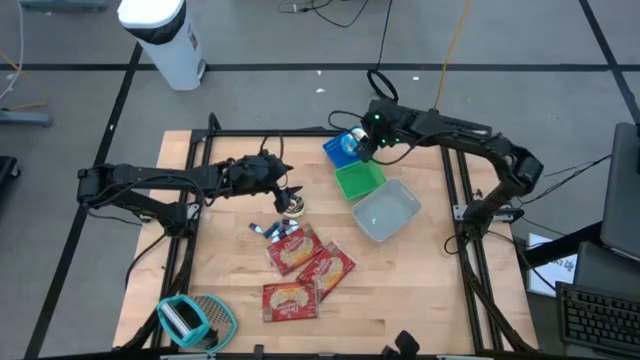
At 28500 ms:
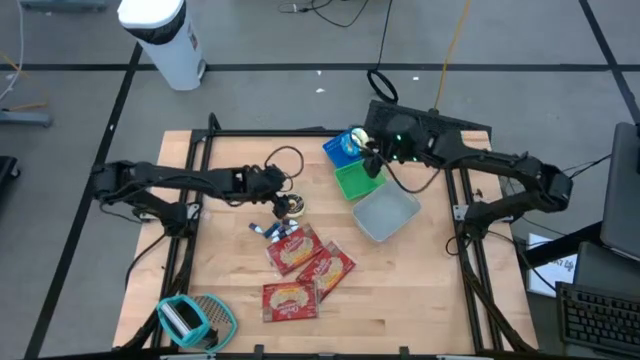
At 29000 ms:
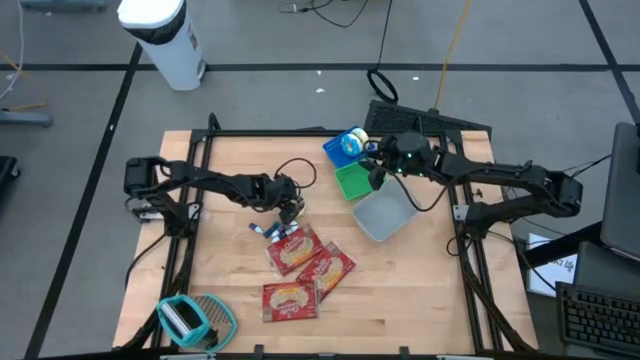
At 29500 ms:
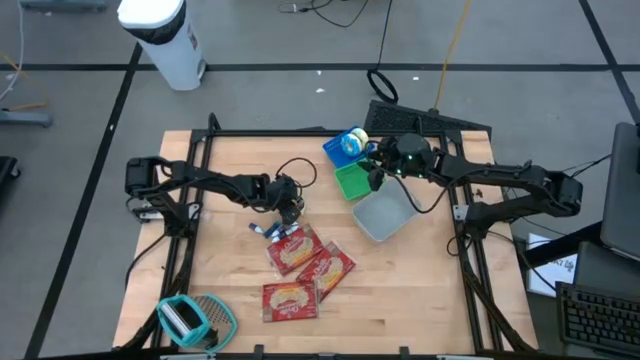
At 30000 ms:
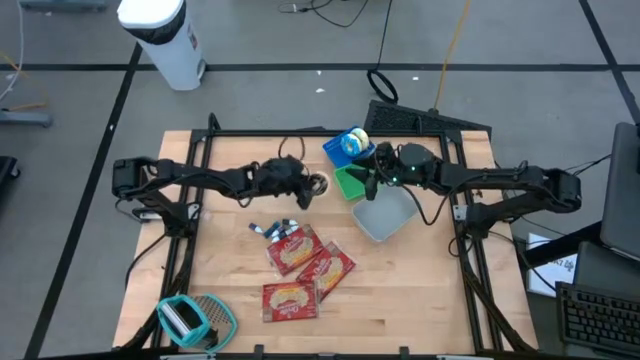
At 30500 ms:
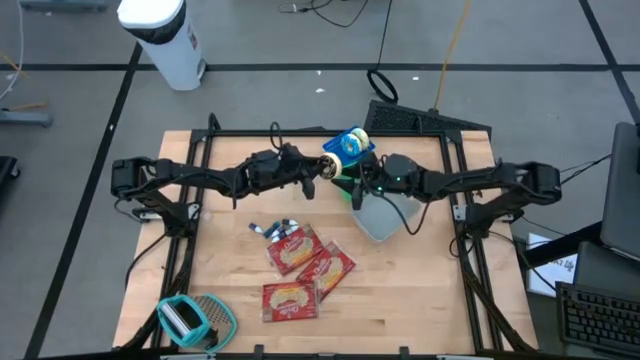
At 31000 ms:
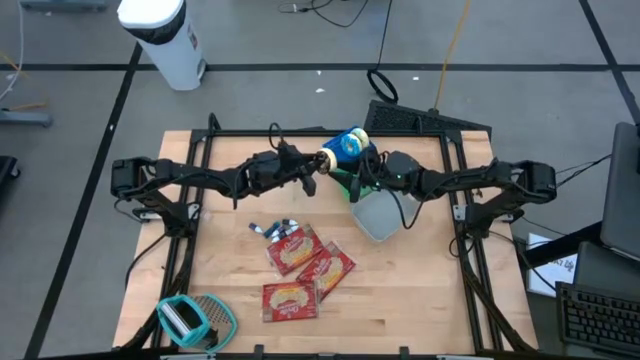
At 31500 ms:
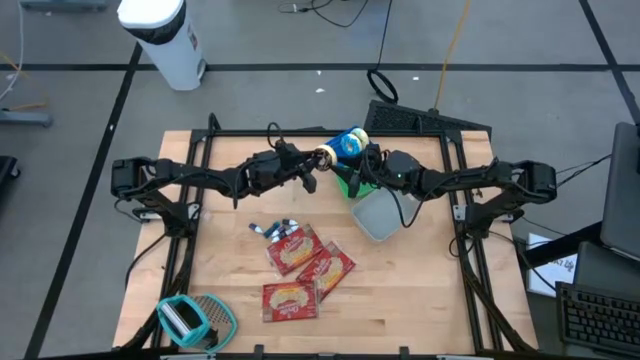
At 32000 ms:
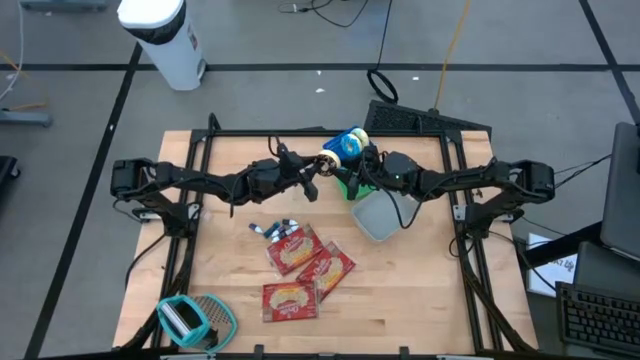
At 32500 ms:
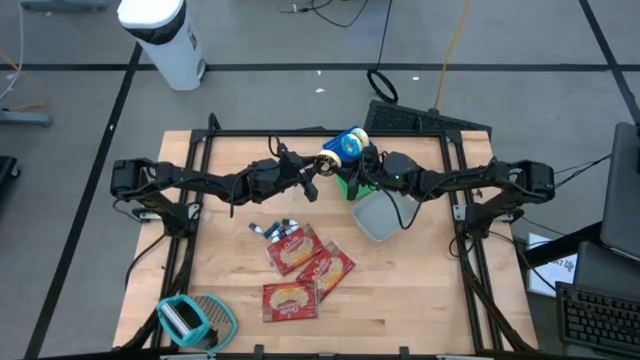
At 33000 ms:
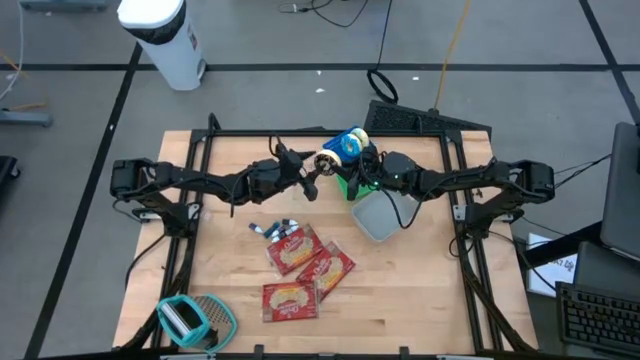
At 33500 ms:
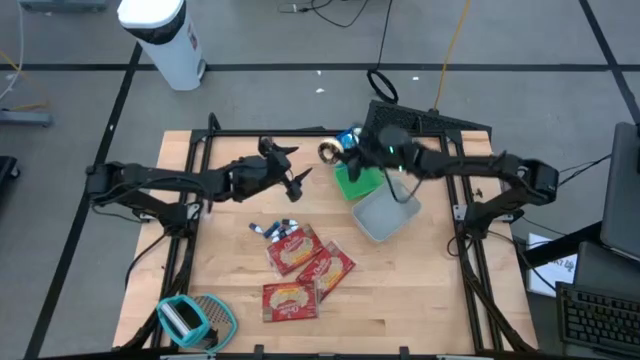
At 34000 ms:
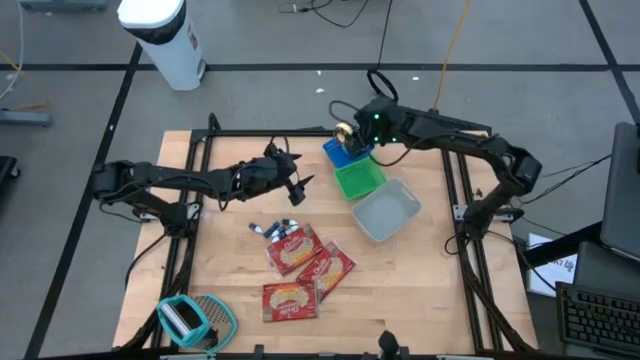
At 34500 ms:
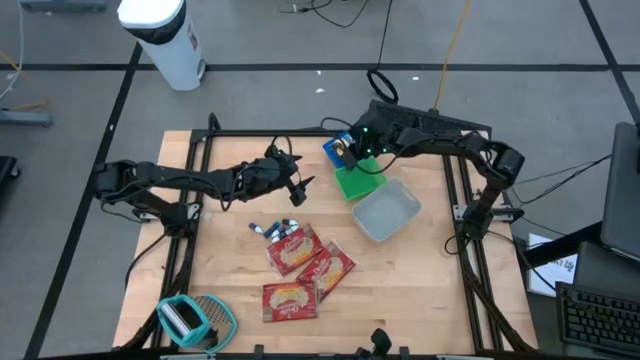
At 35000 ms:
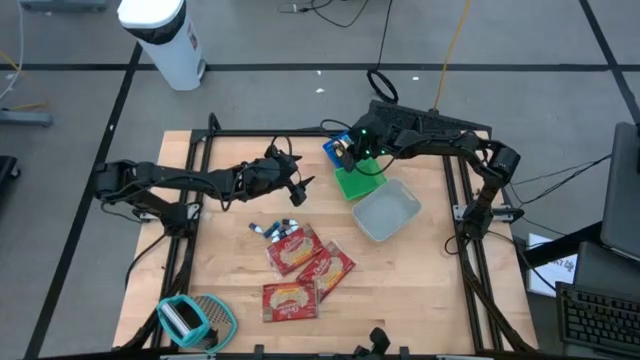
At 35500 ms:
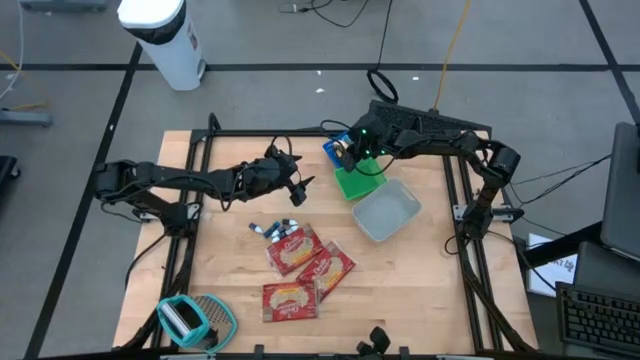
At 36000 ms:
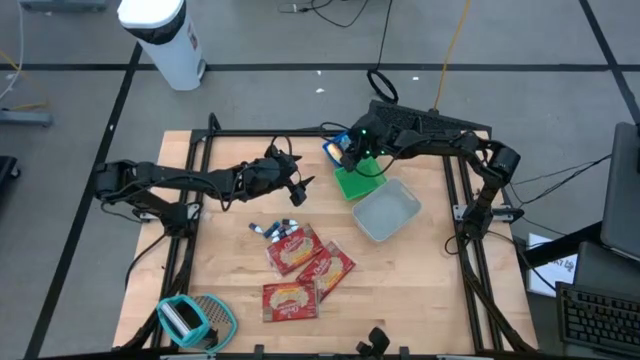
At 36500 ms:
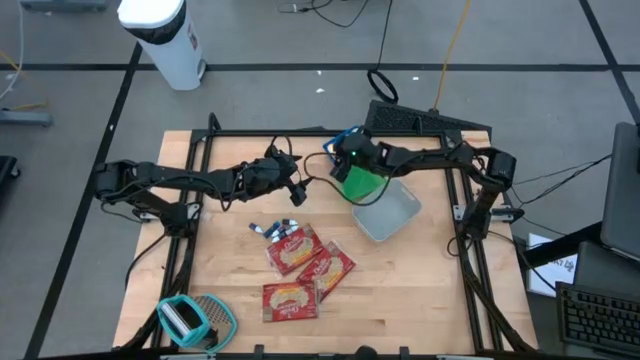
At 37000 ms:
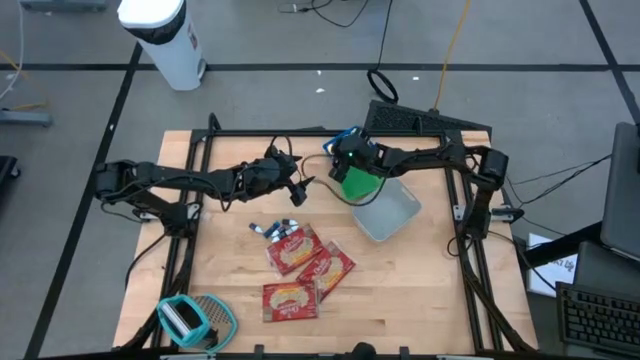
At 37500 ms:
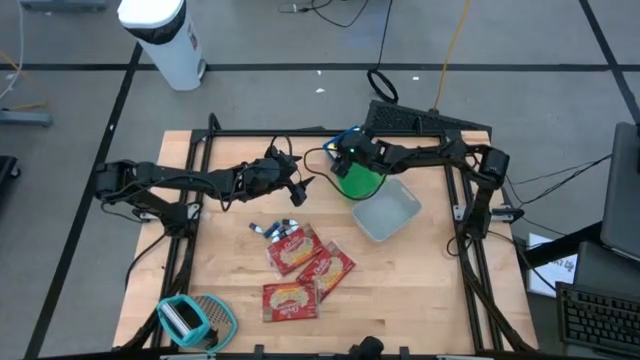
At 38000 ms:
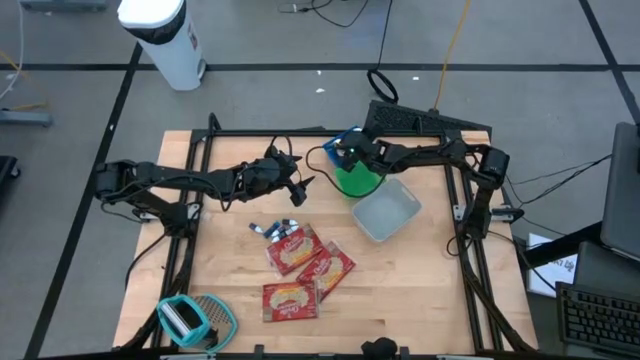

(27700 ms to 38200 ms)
Put the black donut into the blue bin

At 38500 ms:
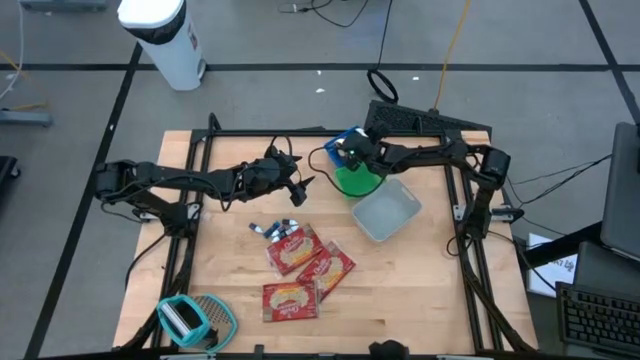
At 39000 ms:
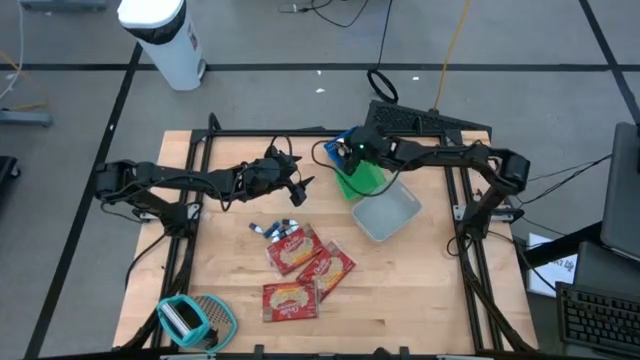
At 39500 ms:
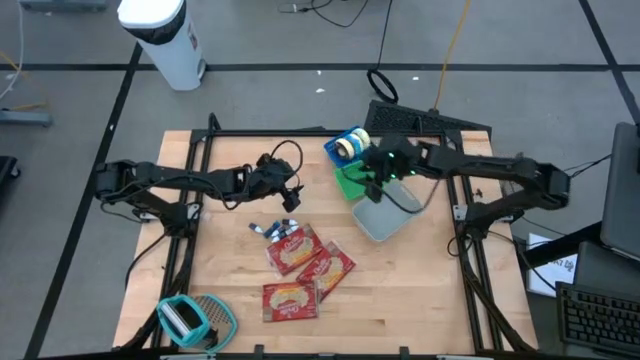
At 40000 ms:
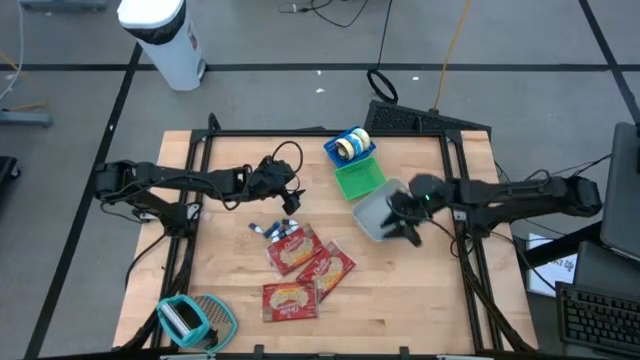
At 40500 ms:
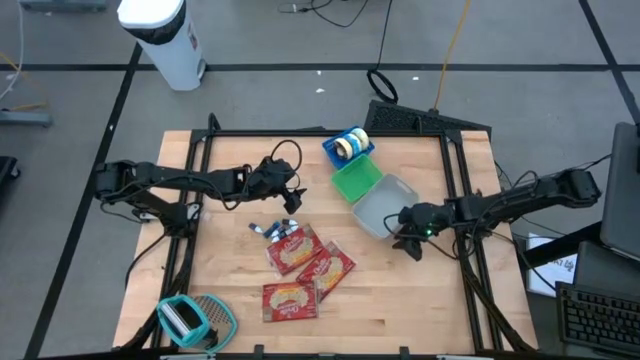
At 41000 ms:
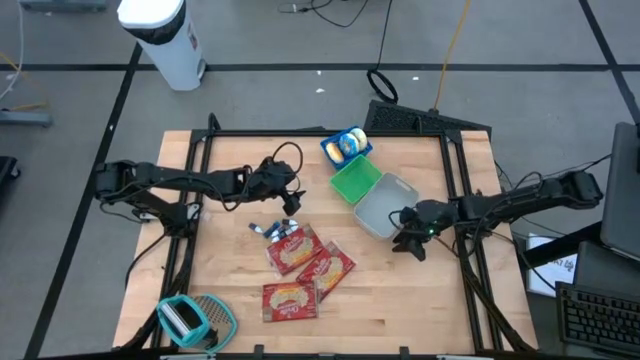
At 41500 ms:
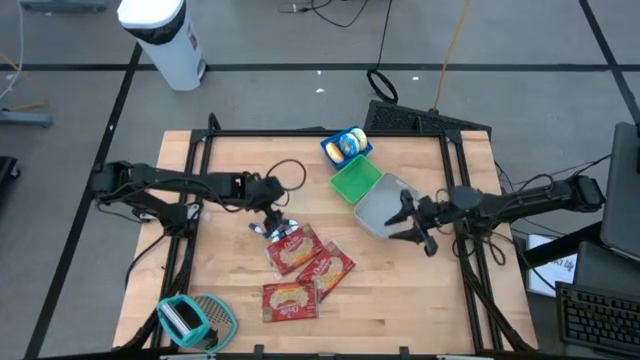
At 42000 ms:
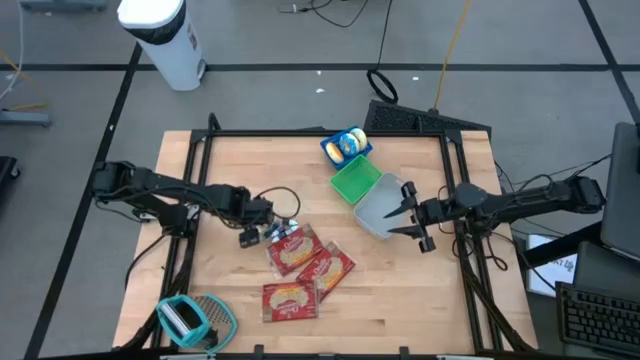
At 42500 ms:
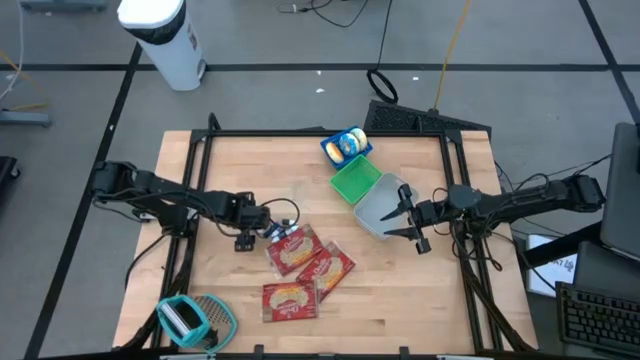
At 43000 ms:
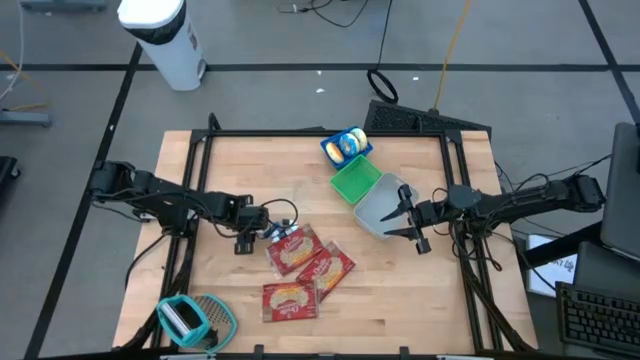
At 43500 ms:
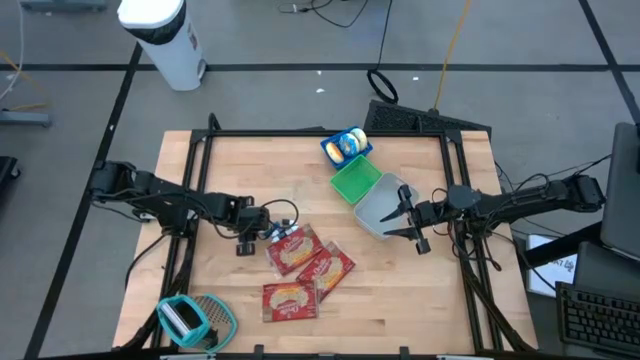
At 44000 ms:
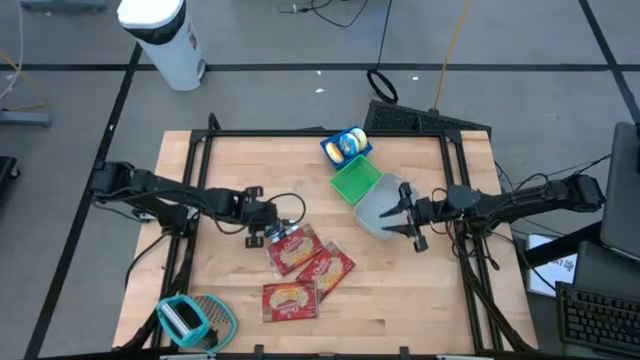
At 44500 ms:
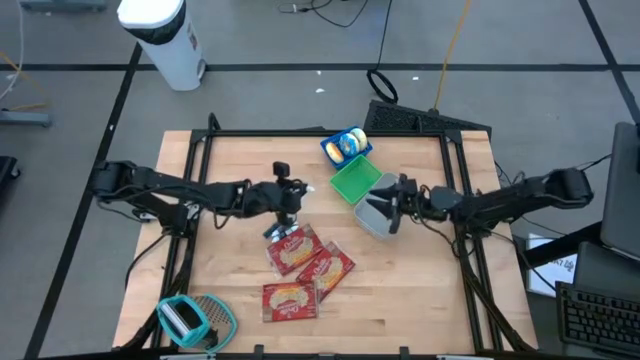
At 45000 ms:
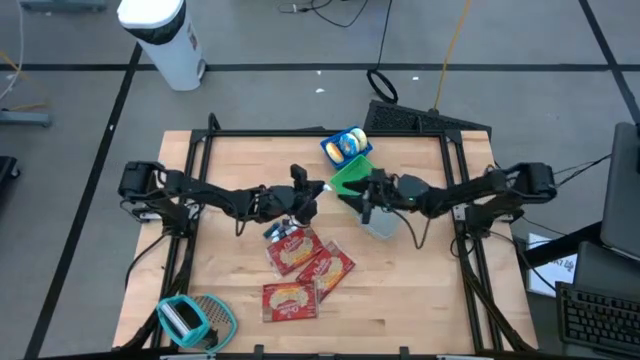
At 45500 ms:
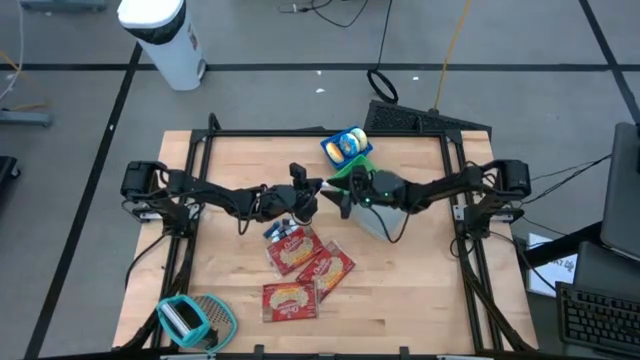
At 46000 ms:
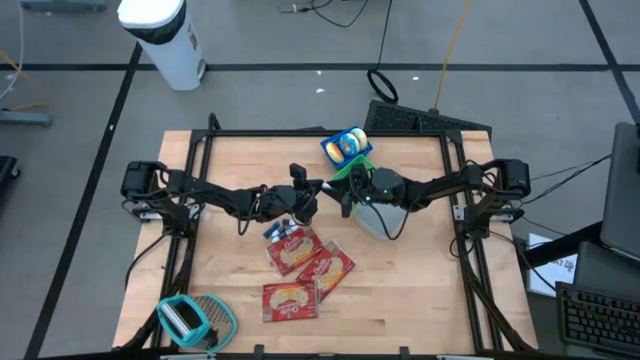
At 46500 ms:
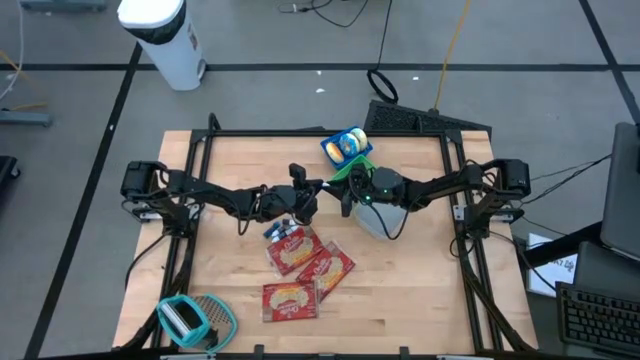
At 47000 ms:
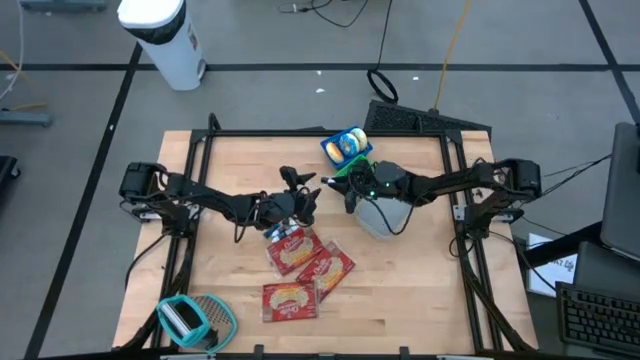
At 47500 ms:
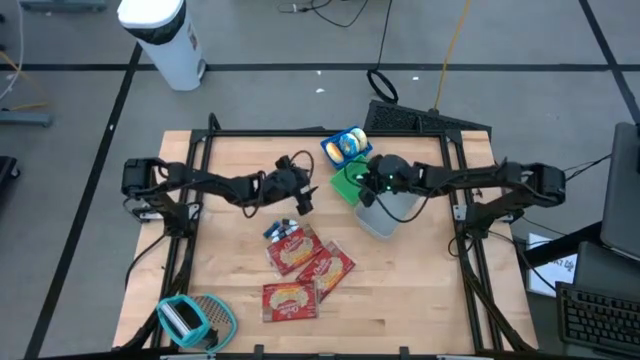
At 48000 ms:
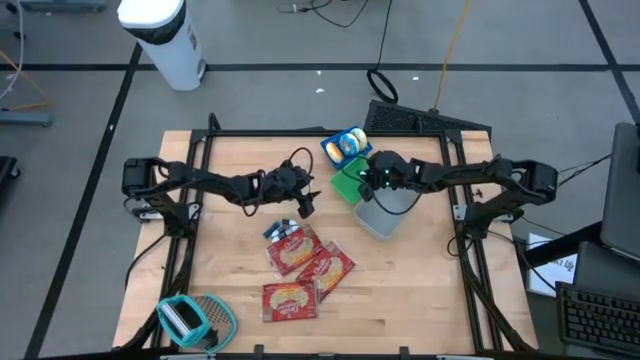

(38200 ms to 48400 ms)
Put the small blue food coloring bottle into the green bin
